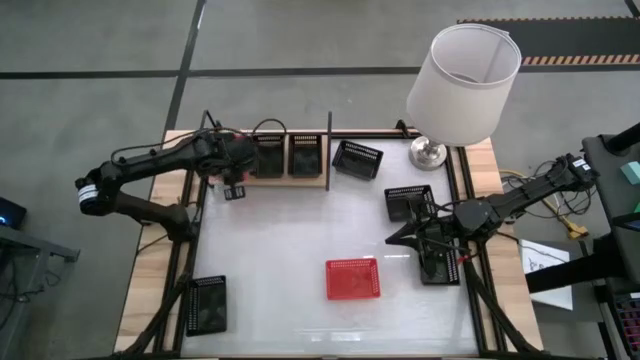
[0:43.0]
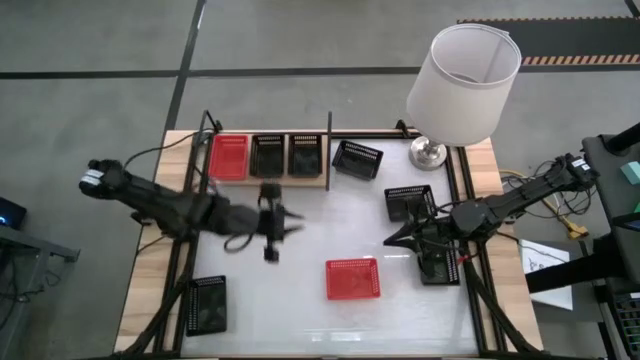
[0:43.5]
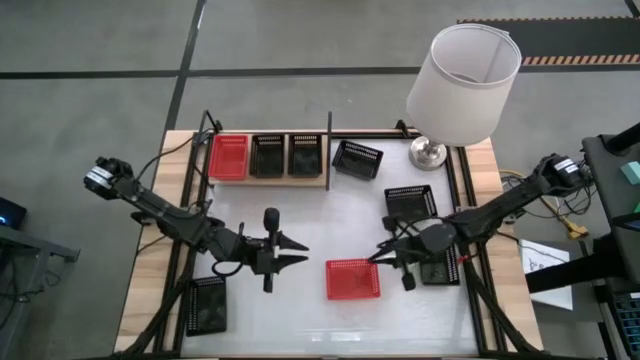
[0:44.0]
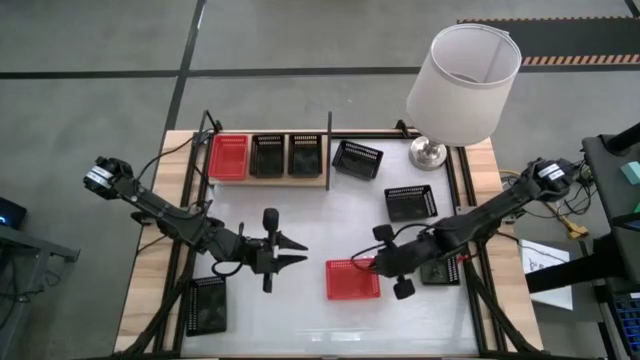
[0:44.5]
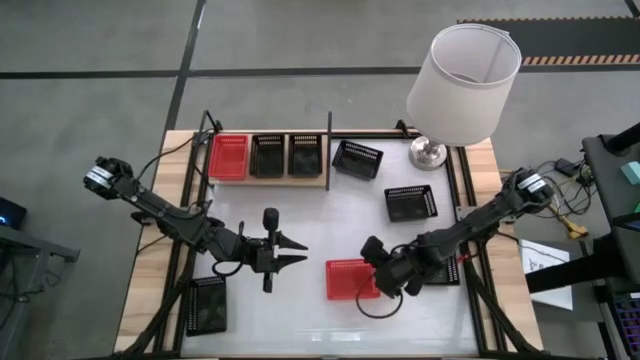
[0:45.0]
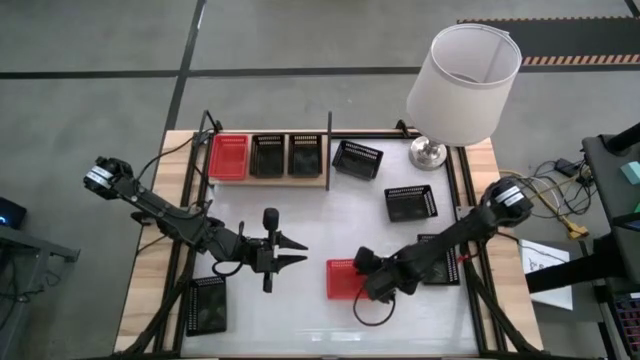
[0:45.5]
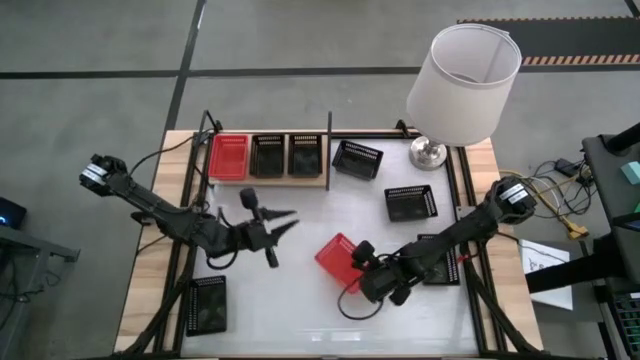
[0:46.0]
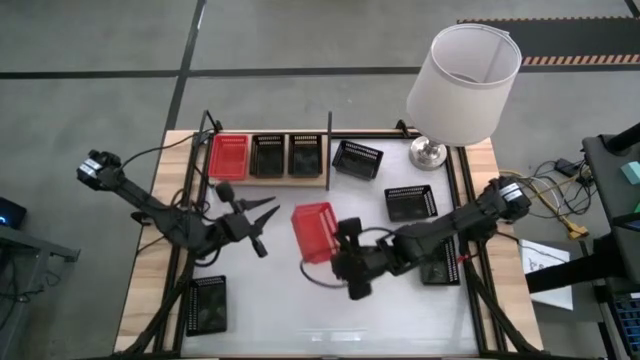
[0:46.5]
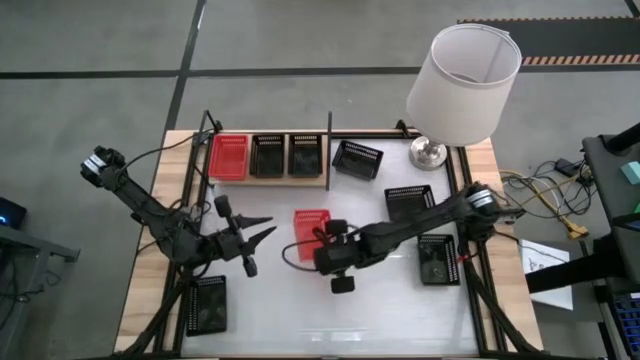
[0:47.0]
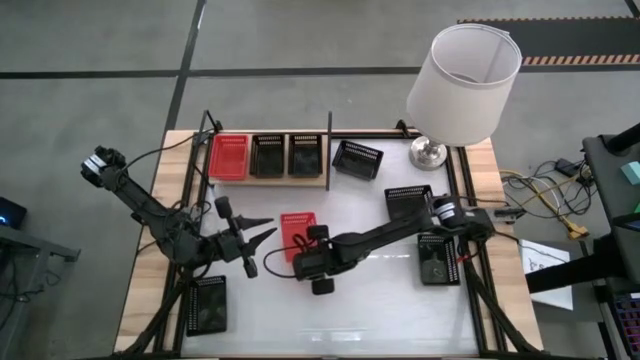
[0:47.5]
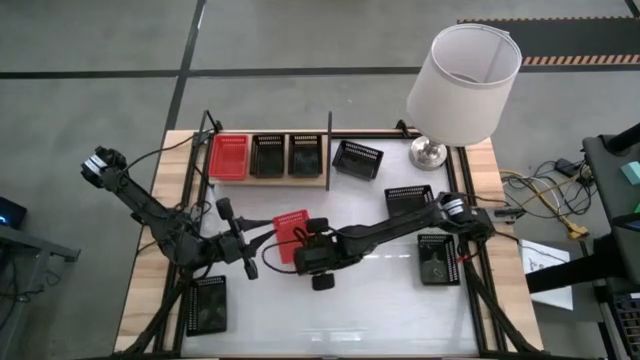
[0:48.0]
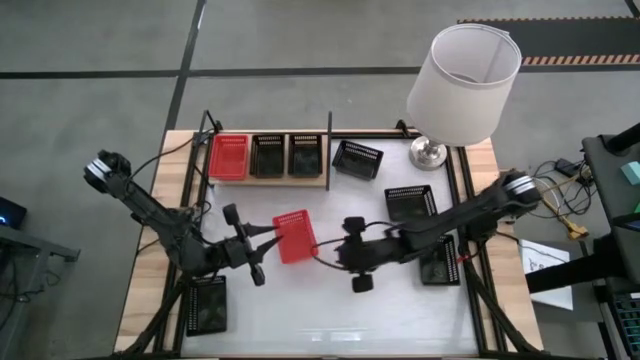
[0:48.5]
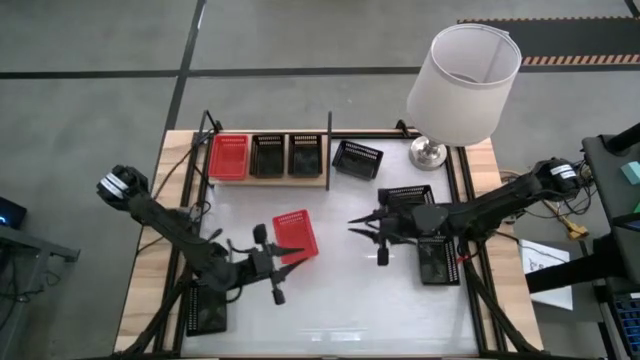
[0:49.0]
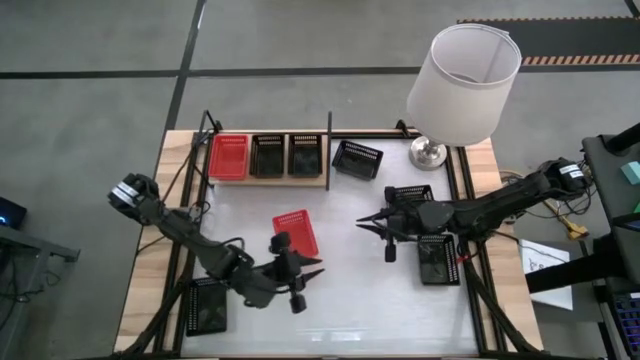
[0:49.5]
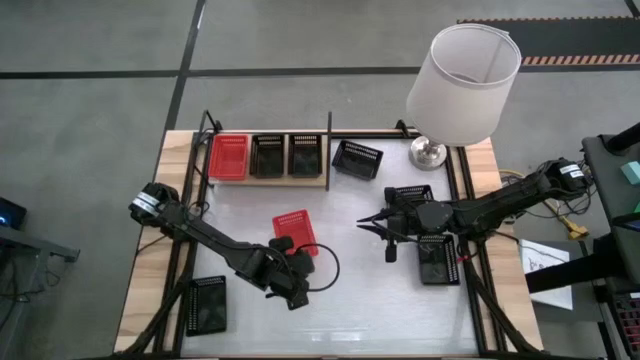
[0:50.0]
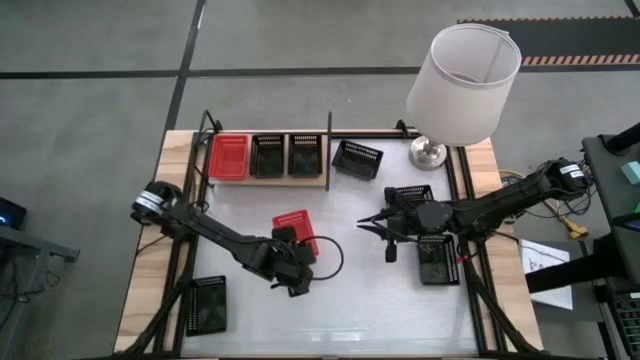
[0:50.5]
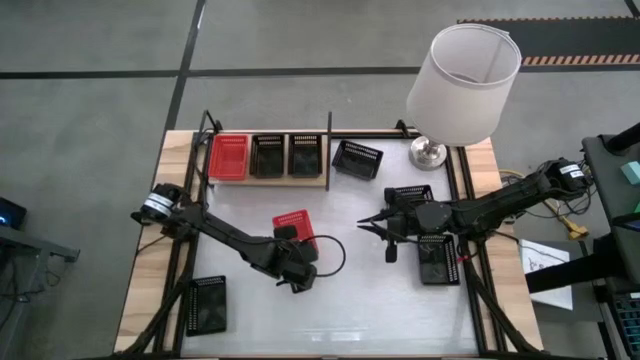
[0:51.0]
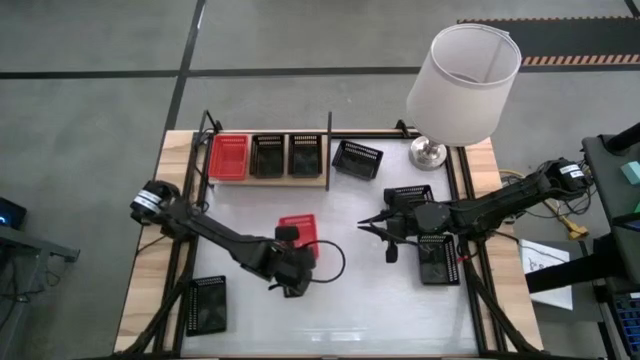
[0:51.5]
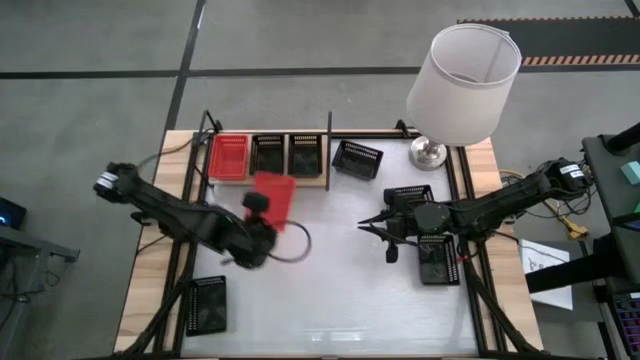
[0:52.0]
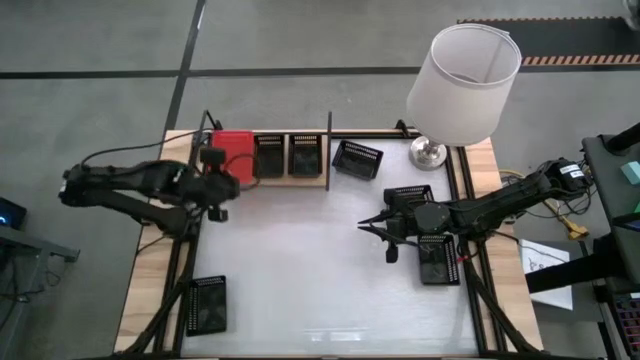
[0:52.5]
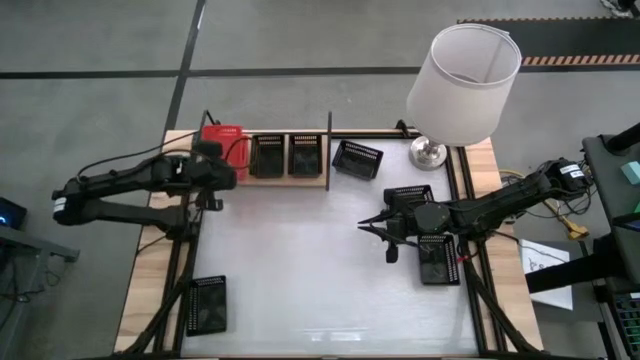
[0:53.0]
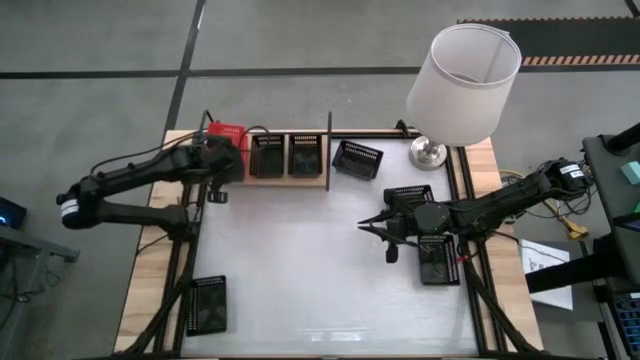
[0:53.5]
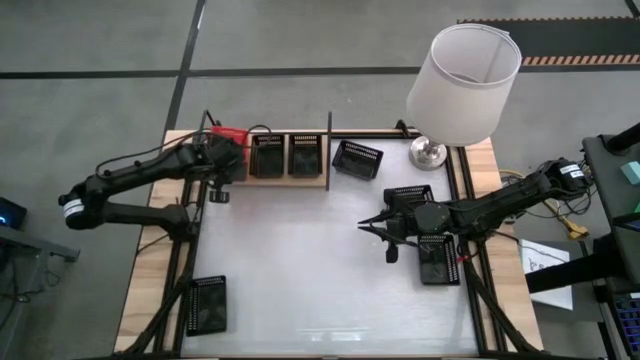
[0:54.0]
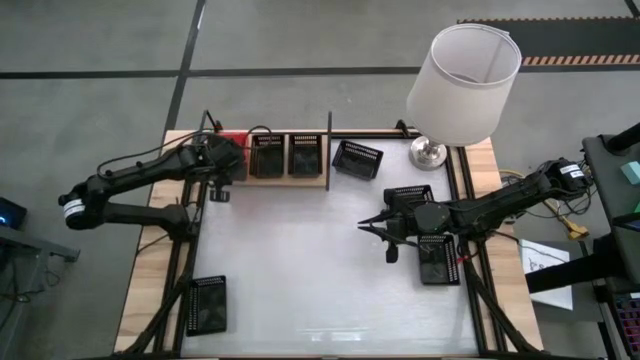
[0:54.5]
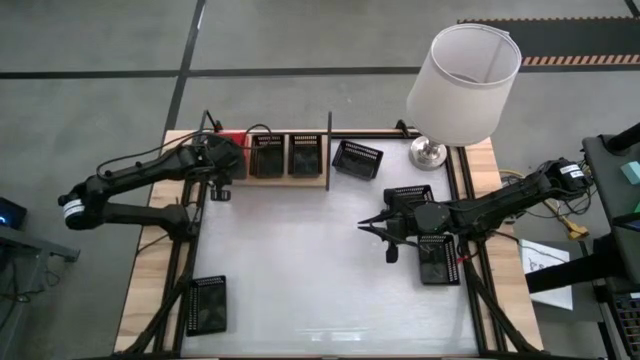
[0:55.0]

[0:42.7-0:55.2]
Task: Stack baskets on shelf by color
Stack the red basket on top of the red basket on the shelf

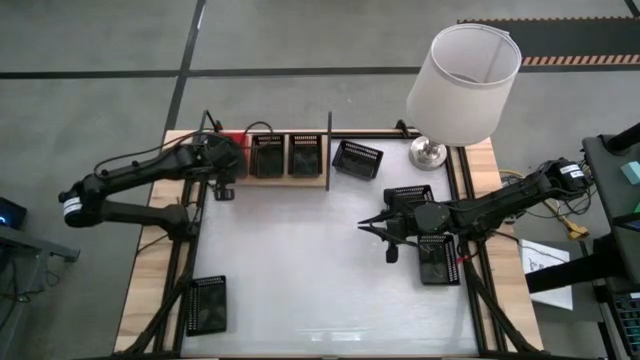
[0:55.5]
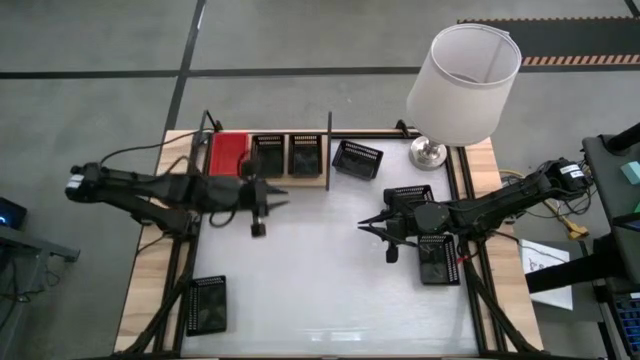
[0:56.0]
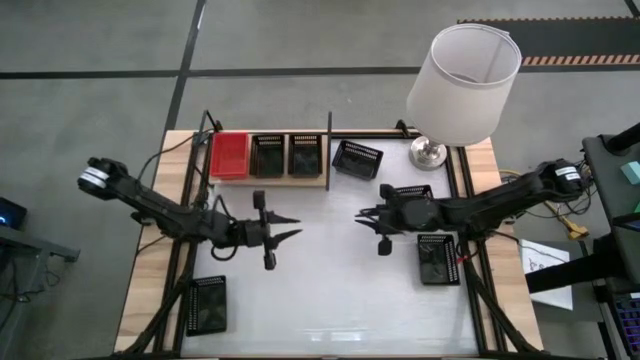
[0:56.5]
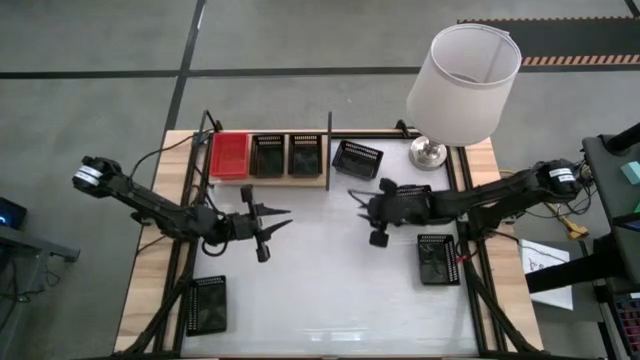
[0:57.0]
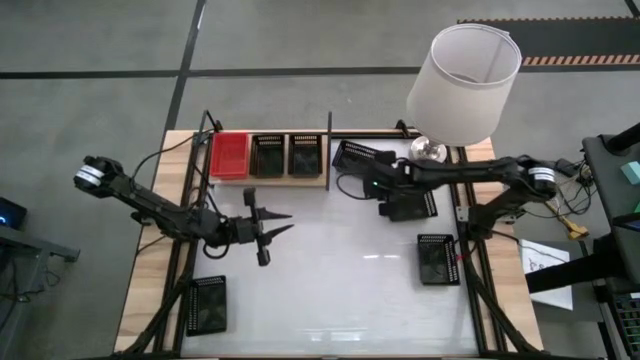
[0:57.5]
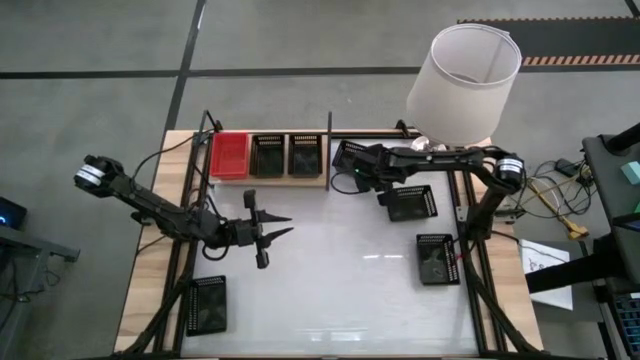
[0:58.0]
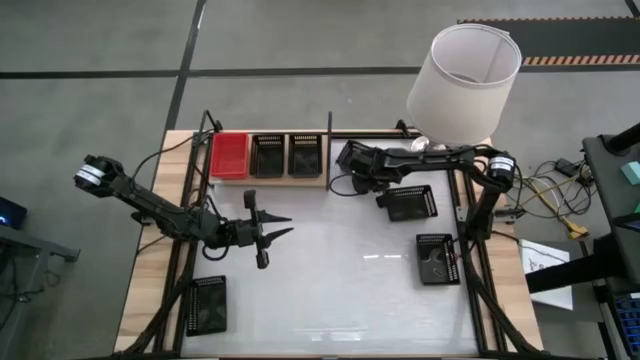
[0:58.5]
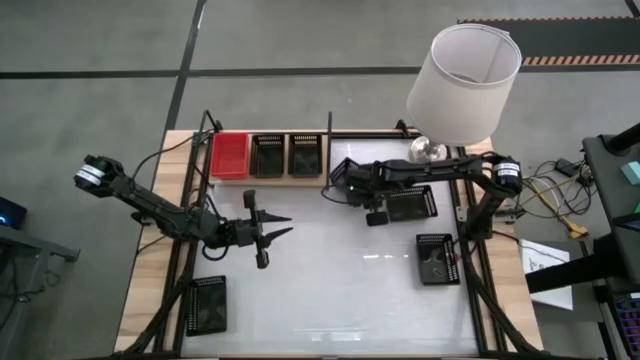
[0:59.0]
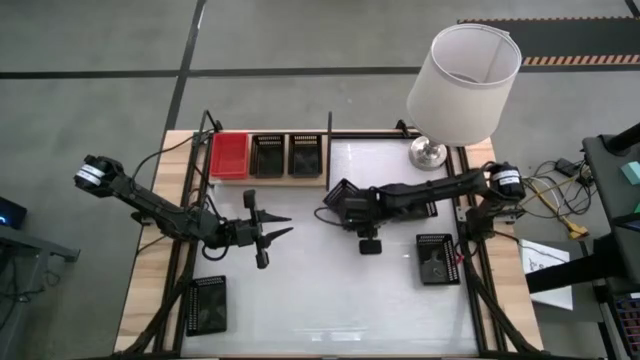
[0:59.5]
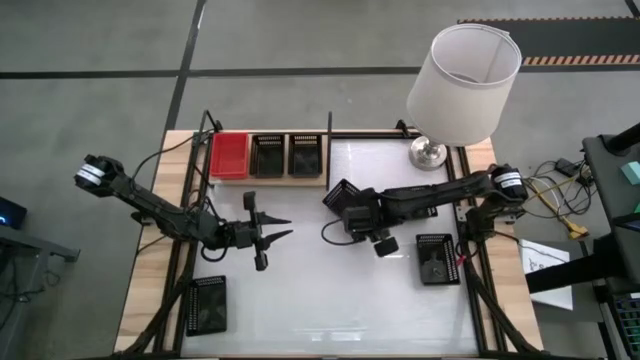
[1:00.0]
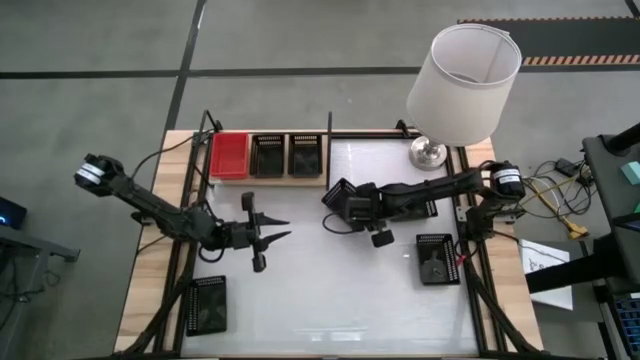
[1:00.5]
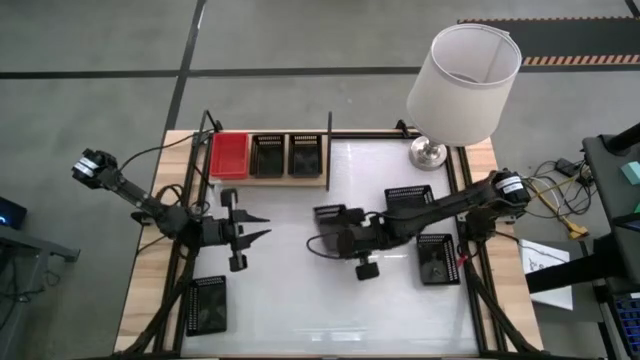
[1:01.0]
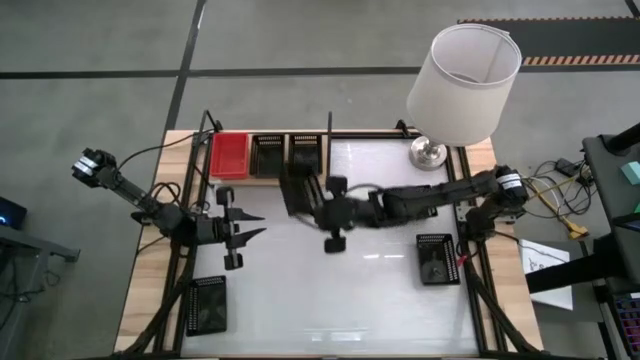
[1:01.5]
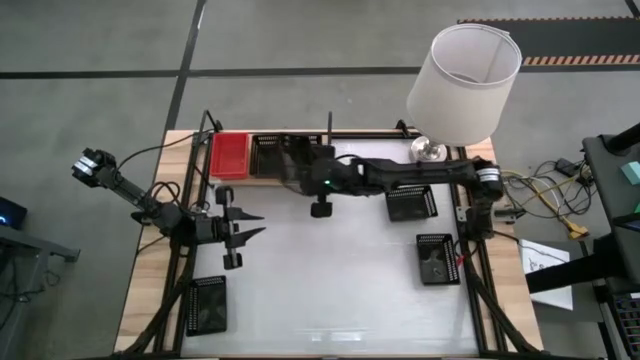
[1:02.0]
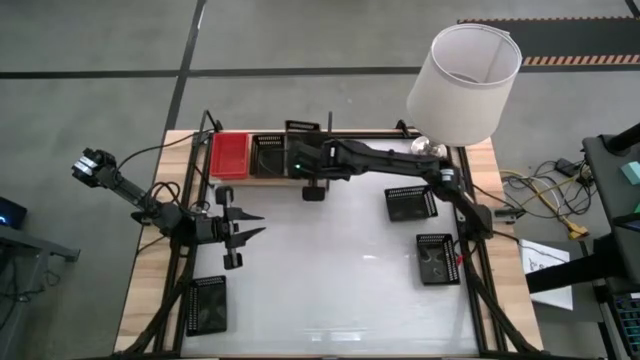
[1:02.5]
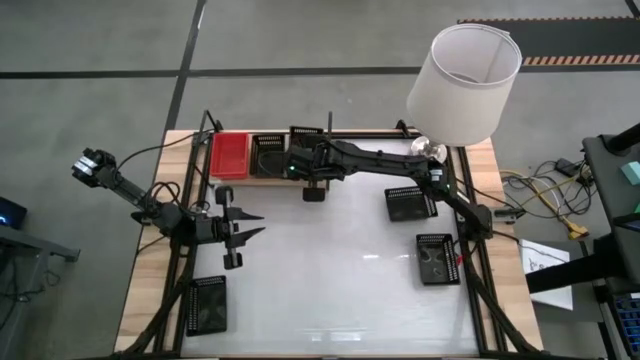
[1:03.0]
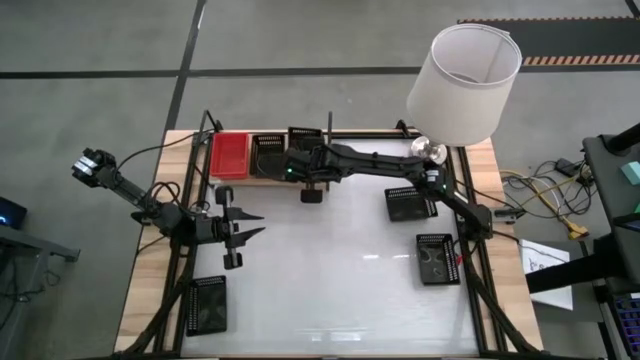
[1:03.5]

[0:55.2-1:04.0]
Stack the black basket on top of the right black basket on the shelf
